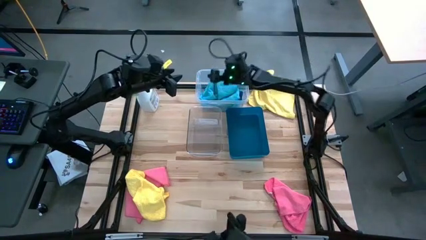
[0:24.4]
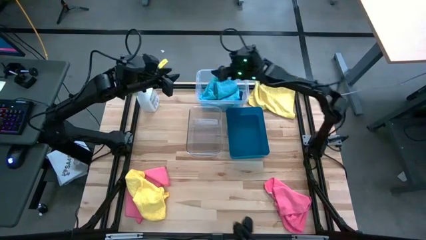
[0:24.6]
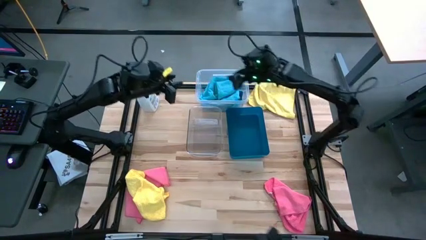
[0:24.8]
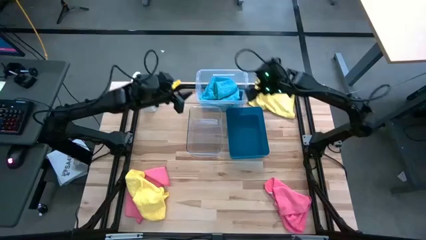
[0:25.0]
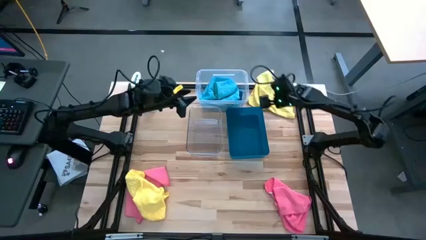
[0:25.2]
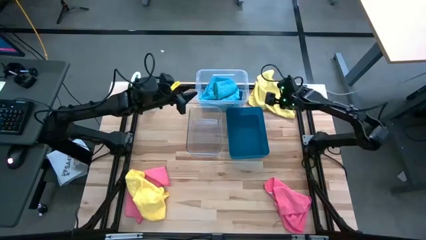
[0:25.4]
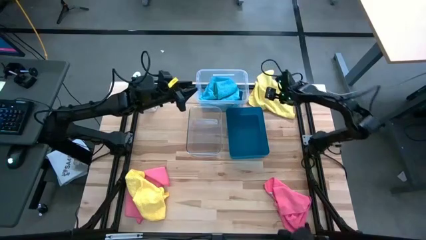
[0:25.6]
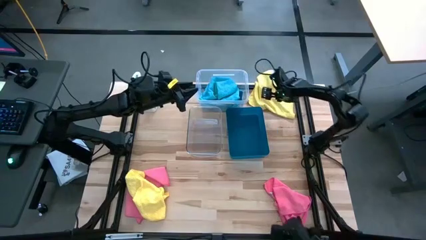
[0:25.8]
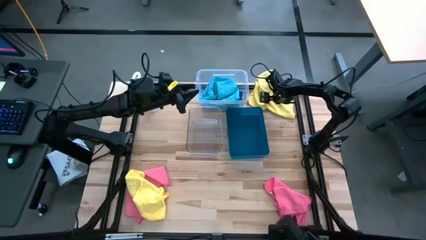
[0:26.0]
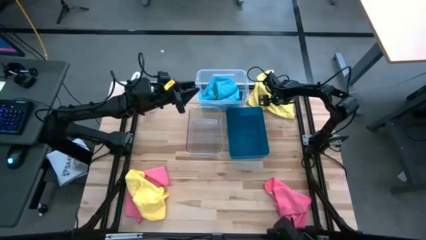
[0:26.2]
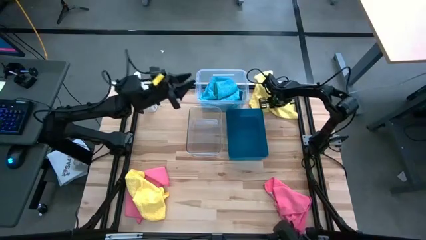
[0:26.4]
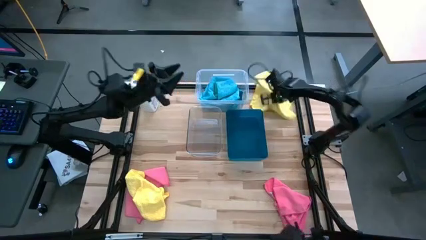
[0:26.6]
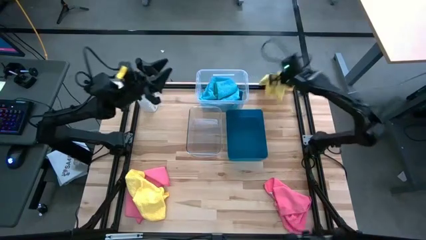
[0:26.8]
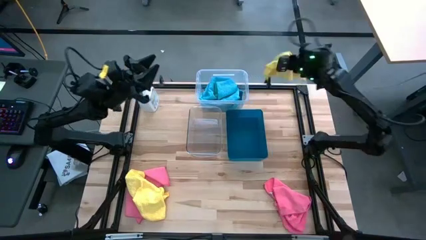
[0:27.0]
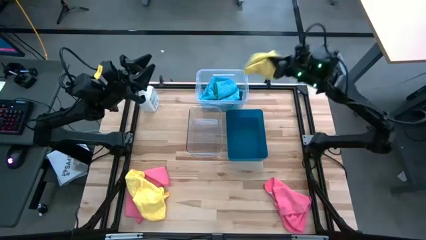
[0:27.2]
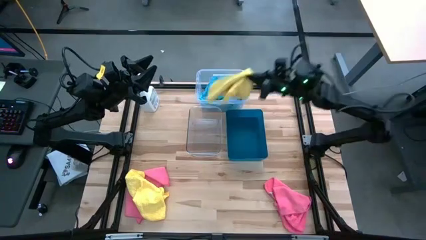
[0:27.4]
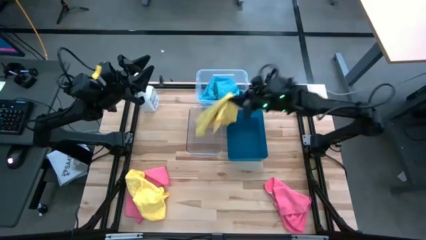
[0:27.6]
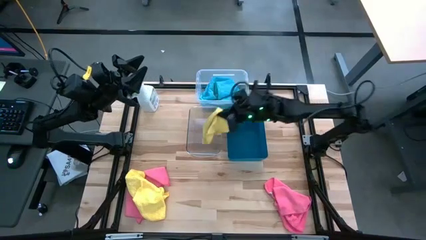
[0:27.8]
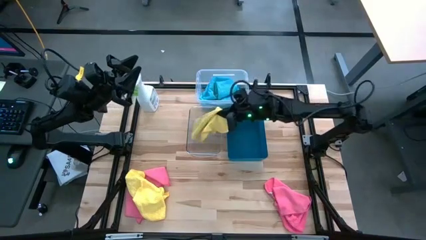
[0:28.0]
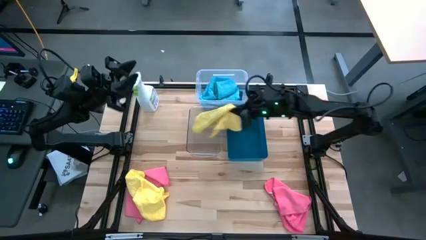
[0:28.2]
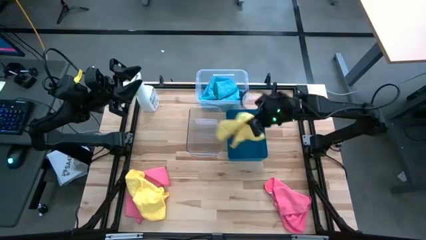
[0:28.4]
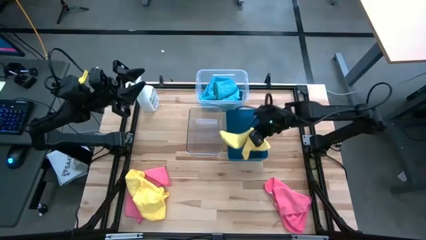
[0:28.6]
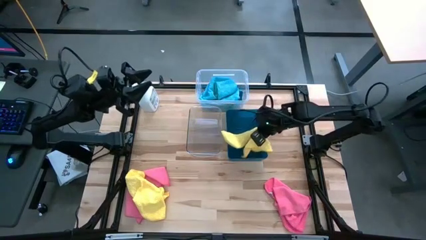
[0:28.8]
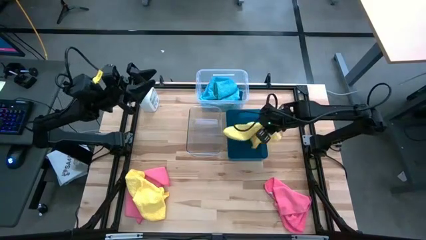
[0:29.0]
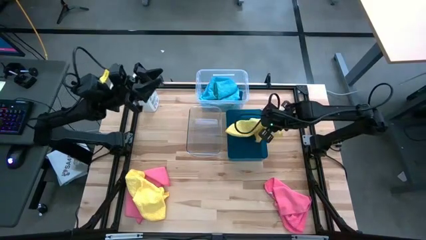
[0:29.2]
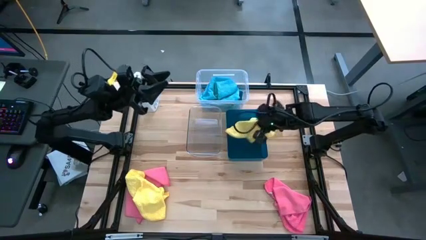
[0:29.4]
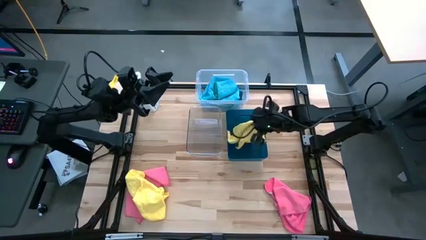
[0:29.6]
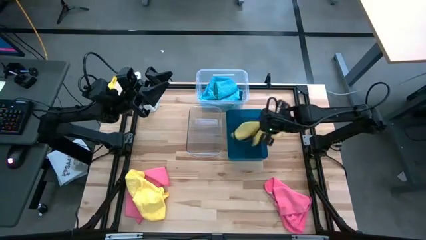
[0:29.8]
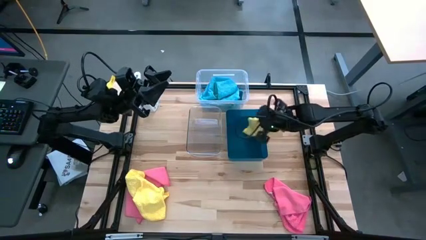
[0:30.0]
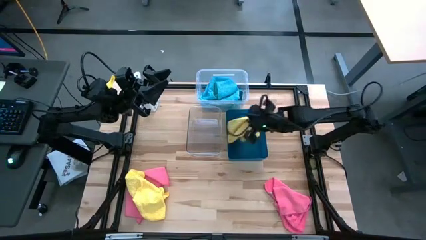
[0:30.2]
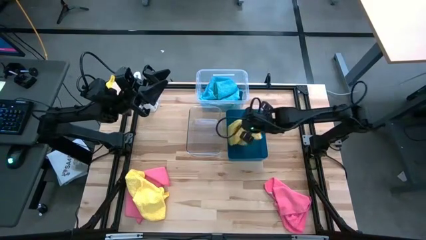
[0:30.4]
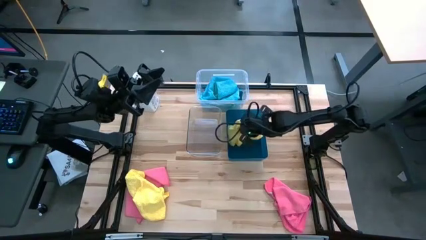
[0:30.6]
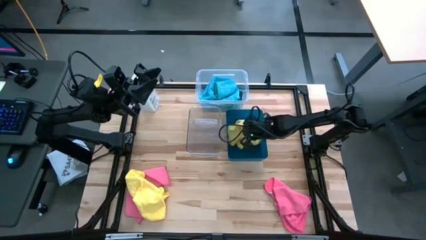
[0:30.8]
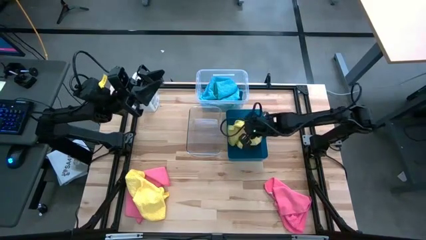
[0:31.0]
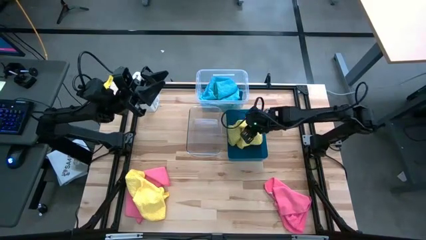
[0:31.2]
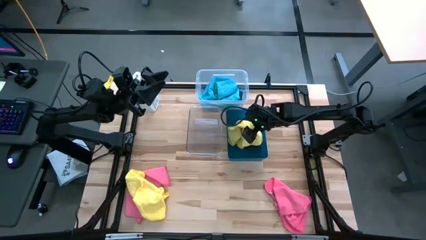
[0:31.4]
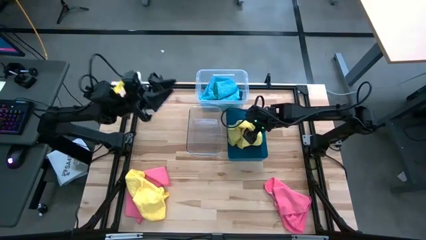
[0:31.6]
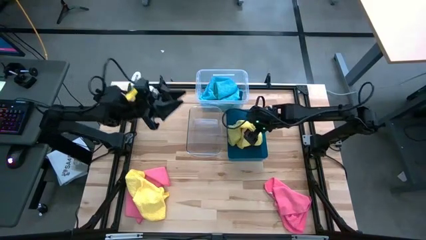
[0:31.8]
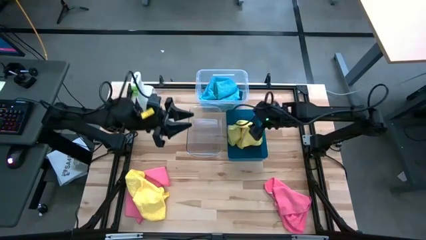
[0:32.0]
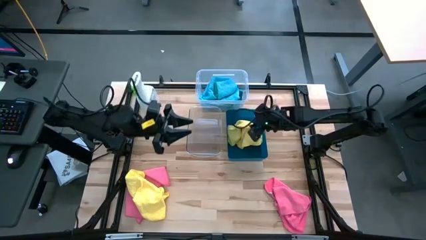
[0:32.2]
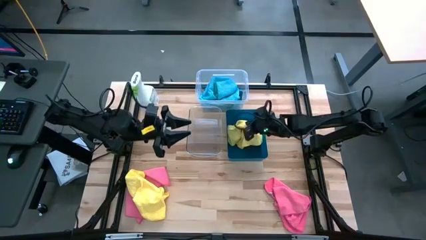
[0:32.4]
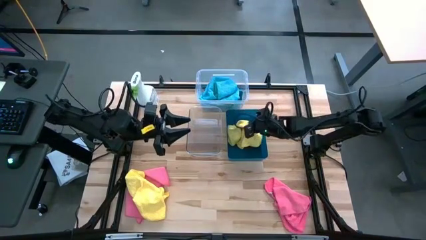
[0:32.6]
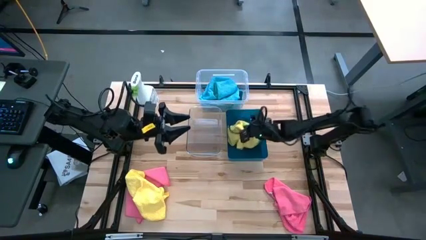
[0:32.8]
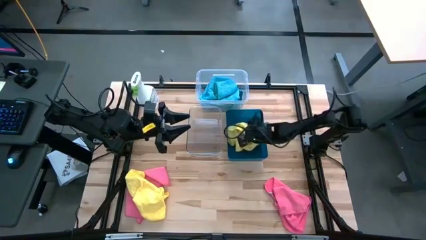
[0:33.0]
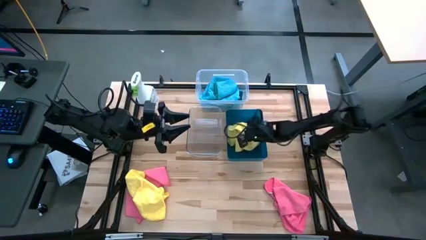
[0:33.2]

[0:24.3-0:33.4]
Task: Sort microfiber towel by color & place in baskets
Put the top yellow towel into the blue bin

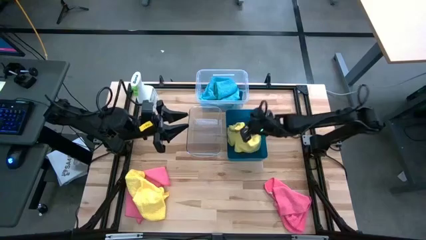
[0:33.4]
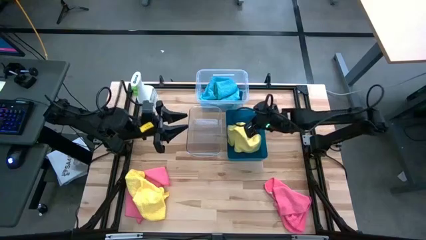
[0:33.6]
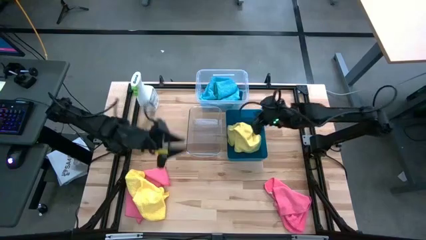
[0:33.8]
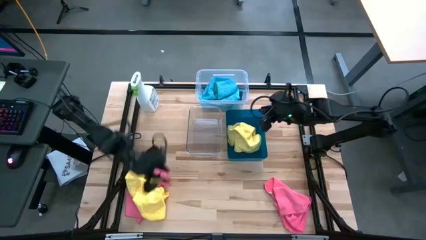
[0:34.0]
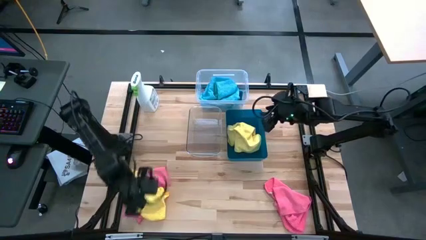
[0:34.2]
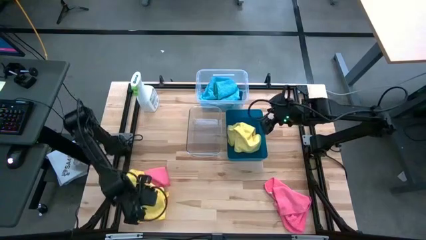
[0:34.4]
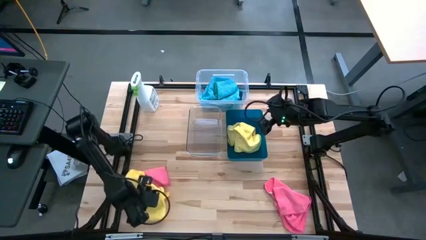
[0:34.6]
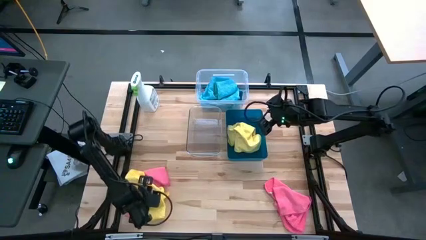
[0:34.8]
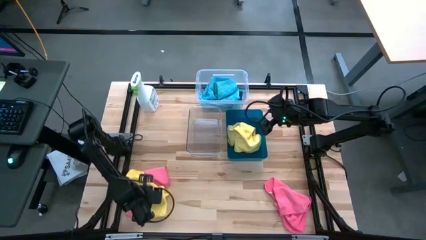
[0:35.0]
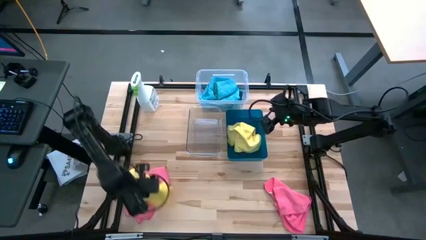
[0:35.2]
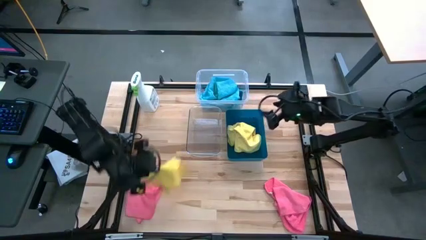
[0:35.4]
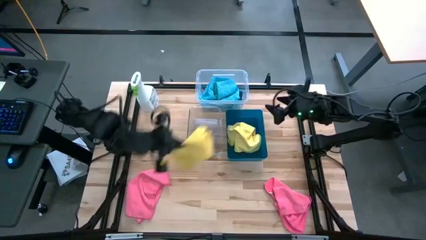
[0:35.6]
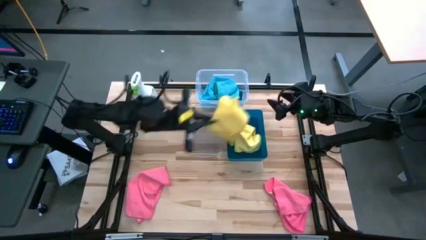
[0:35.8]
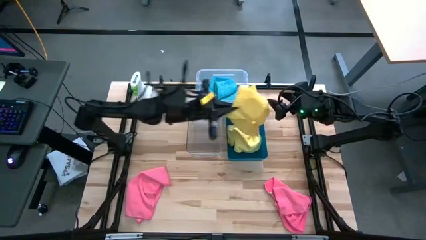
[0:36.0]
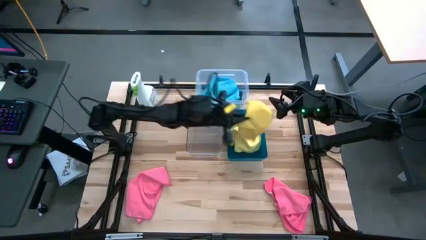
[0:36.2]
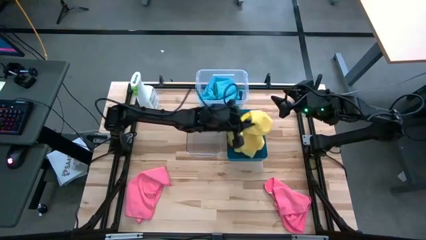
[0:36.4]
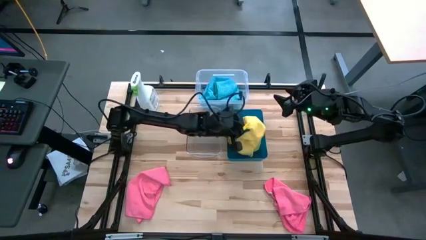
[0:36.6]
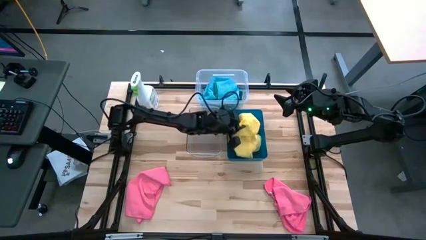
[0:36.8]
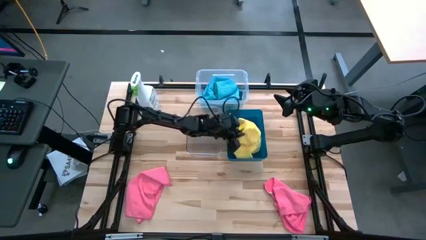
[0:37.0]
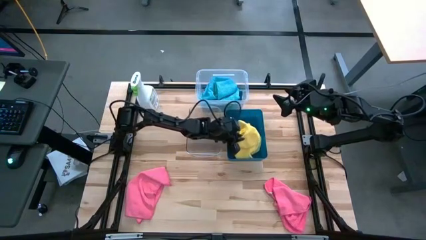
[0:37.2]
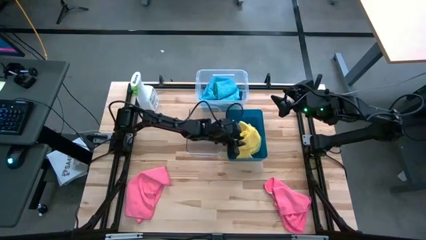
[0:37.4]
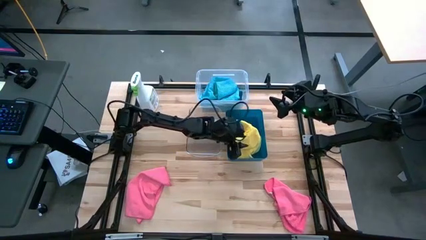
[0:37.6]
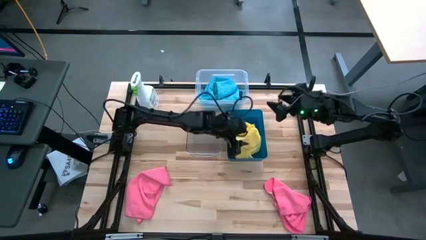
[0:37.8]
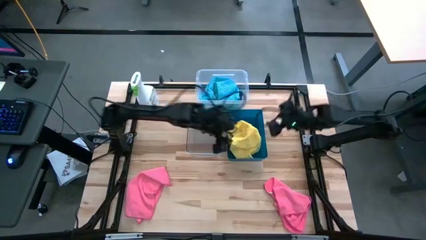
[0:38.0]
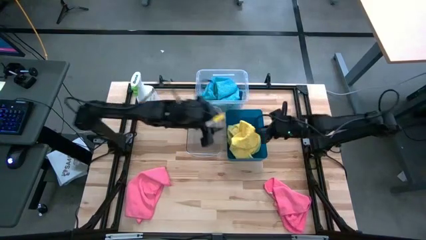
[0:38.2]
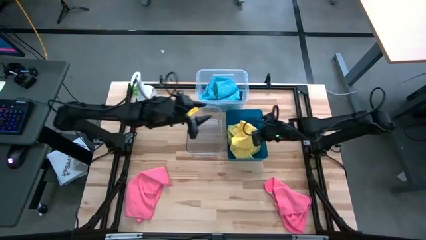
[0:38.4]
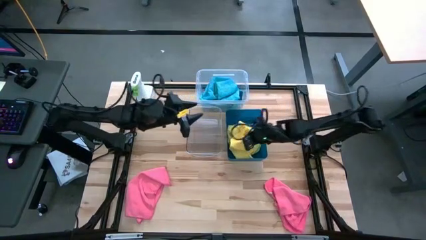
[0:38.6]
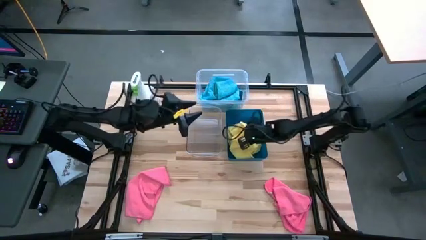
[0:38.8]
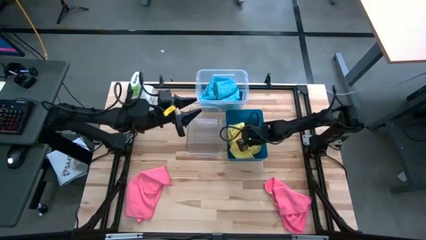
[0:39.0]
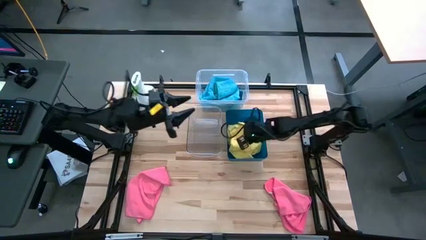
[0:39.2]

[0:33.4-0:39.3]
Put the yellow towel in the blue bin

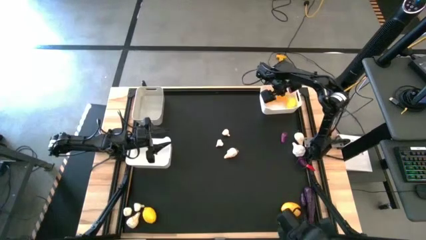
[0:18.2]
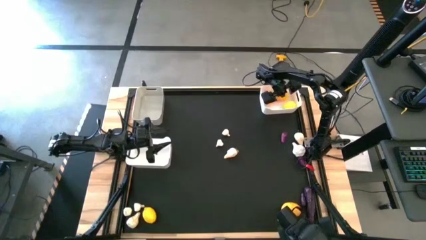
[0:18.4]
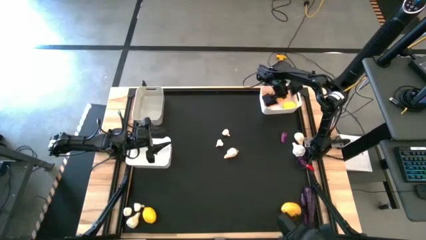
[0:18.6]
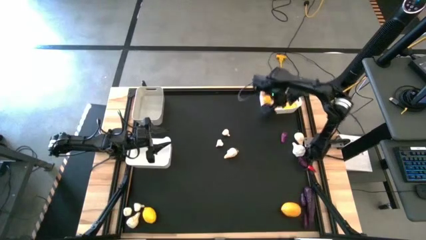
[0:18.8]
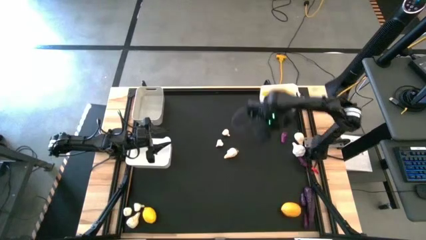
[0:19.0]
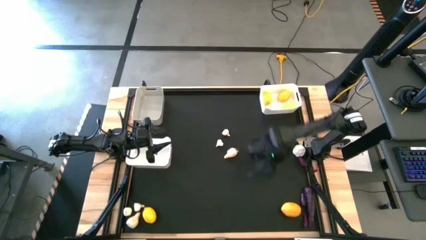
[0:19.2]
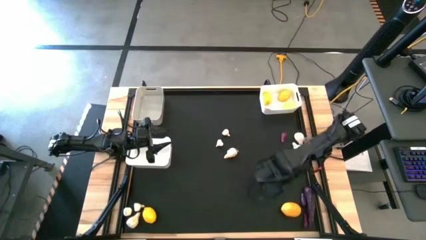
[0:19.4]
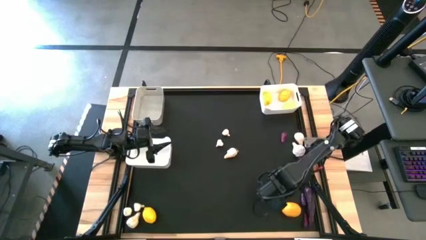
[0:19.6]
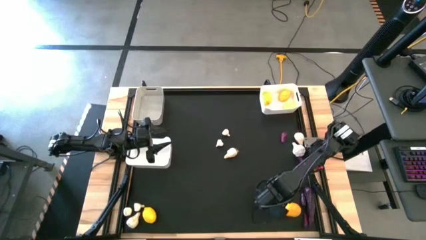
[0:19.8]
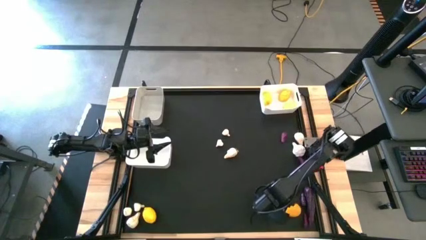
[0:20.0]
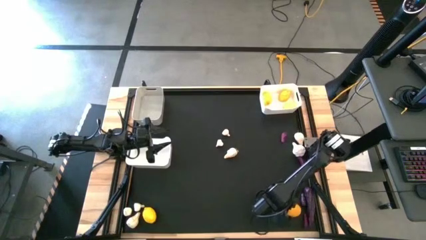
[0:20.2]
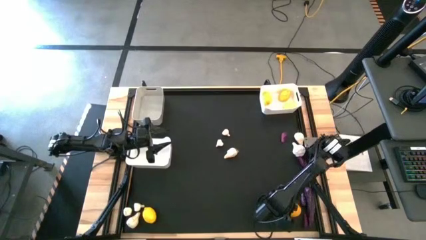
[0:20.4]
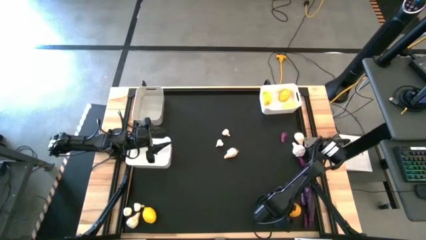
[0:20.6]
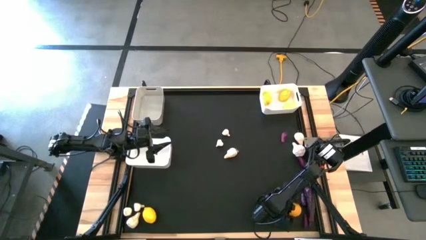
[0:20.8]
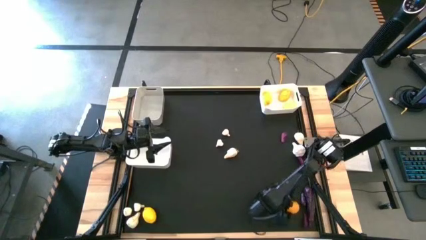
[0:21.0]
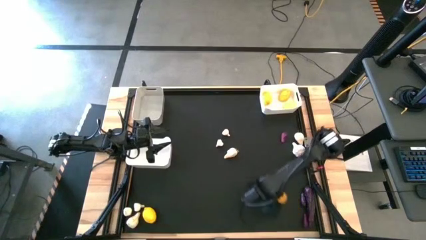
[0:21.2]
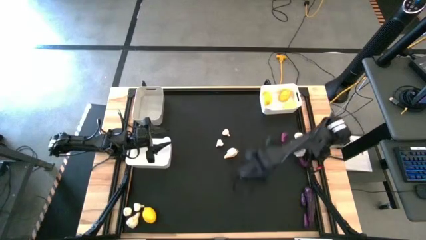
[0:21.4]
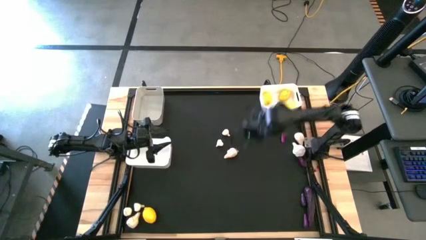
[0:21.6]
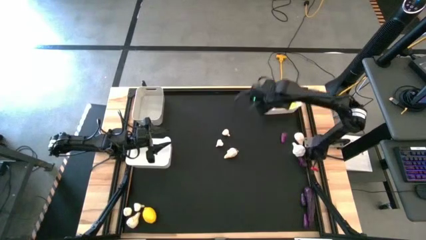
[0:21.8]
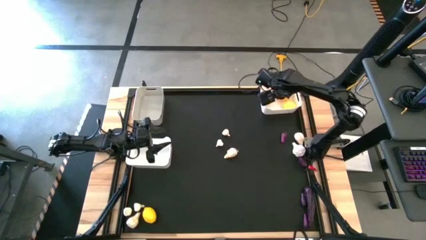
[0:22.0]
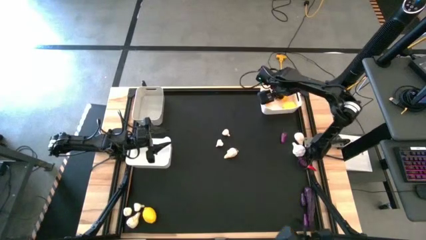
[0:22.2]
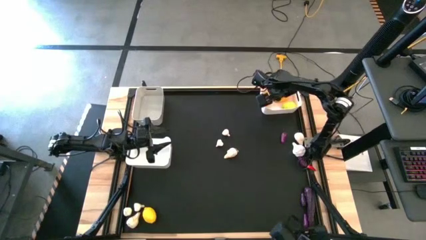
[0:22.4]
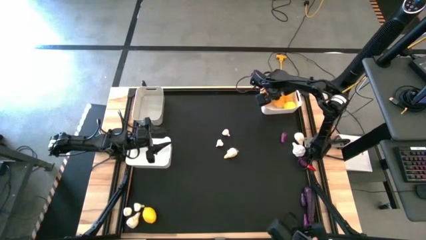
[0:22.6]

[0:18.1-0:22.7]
Task: Sort produce into baskets
Put the yellow lemon into the top white bin
